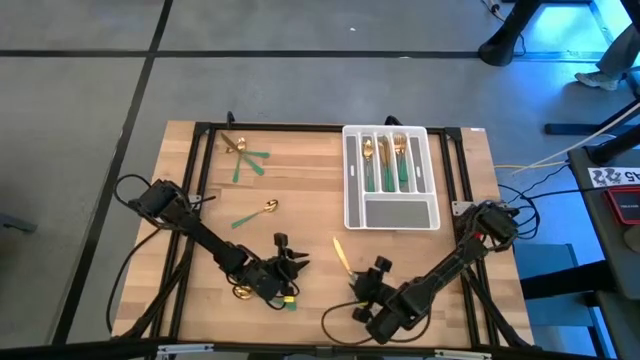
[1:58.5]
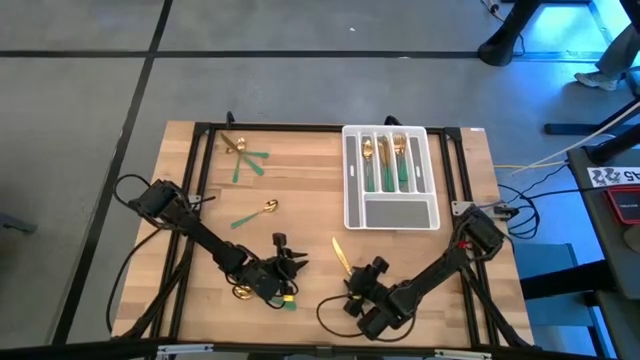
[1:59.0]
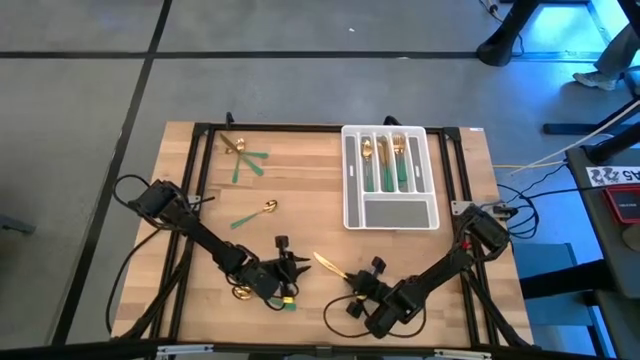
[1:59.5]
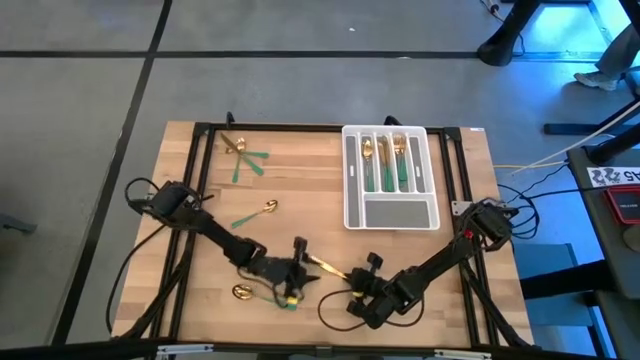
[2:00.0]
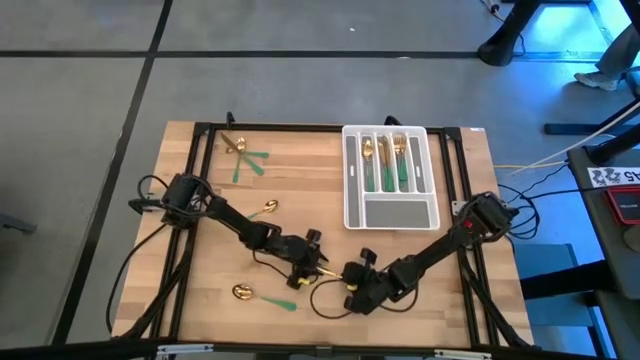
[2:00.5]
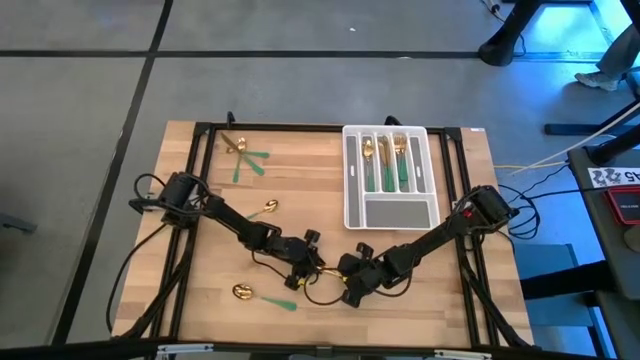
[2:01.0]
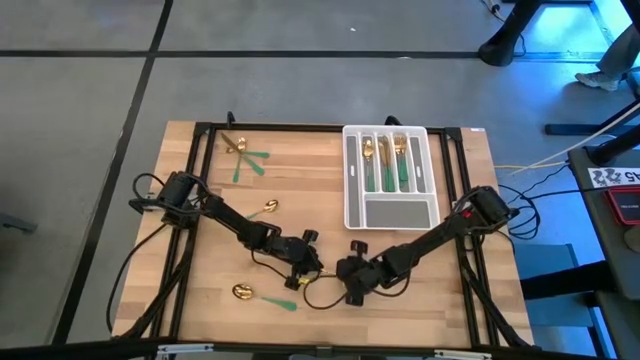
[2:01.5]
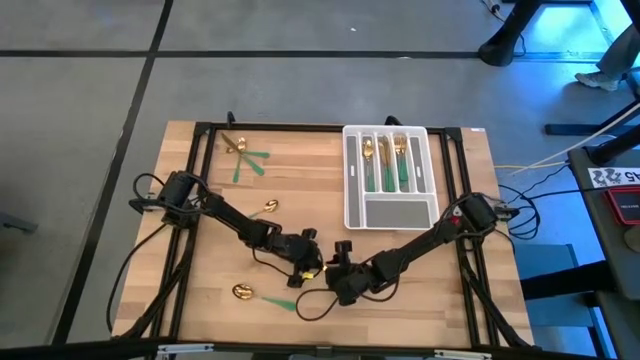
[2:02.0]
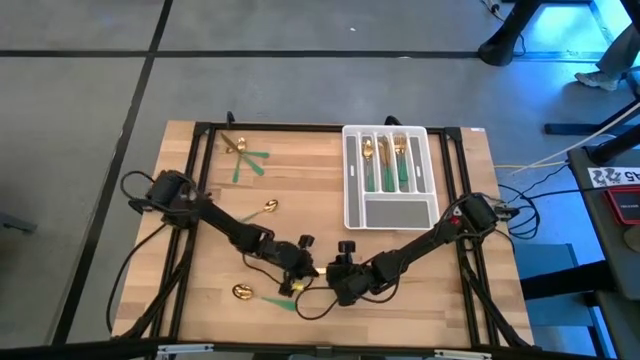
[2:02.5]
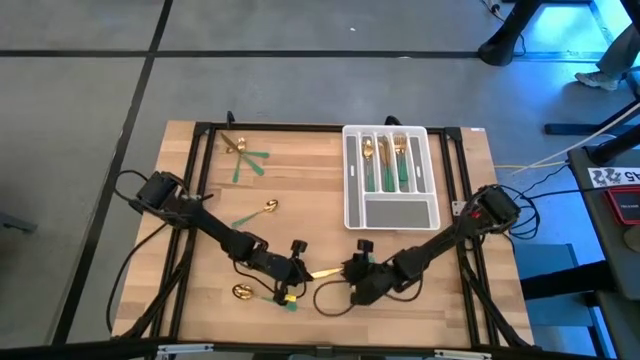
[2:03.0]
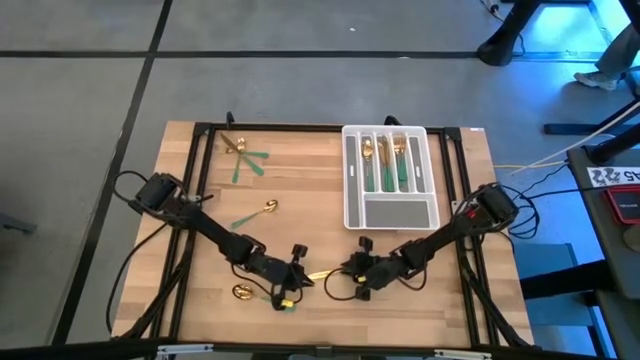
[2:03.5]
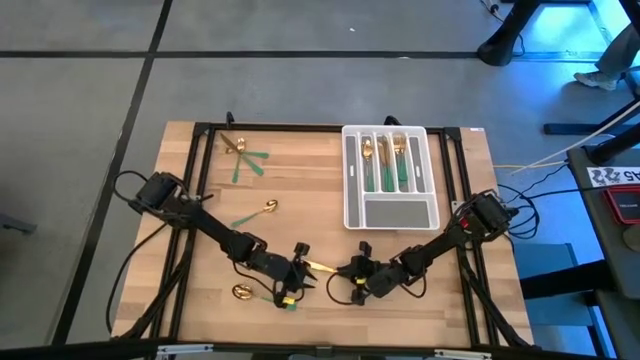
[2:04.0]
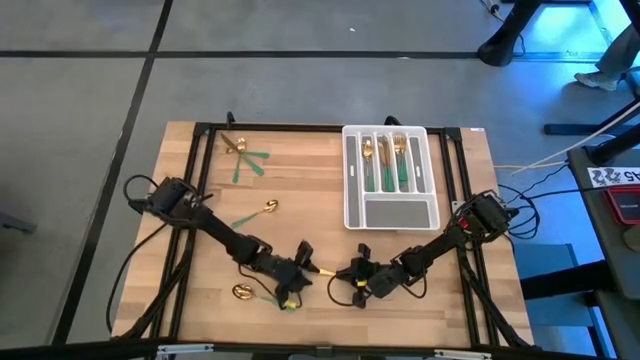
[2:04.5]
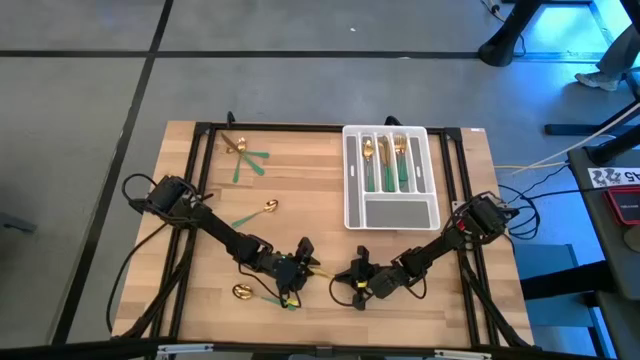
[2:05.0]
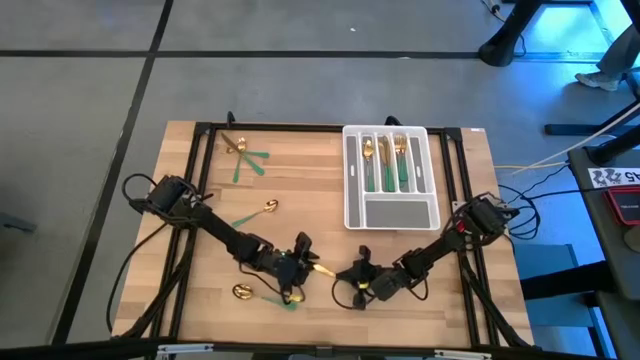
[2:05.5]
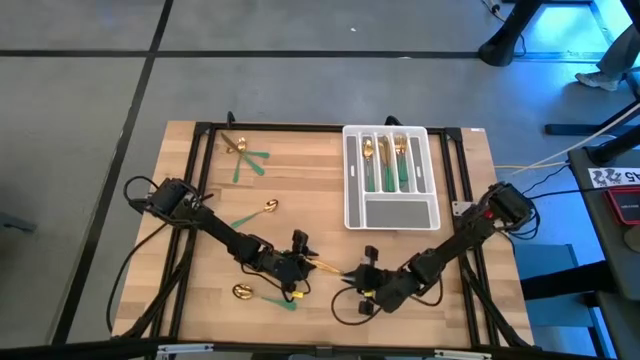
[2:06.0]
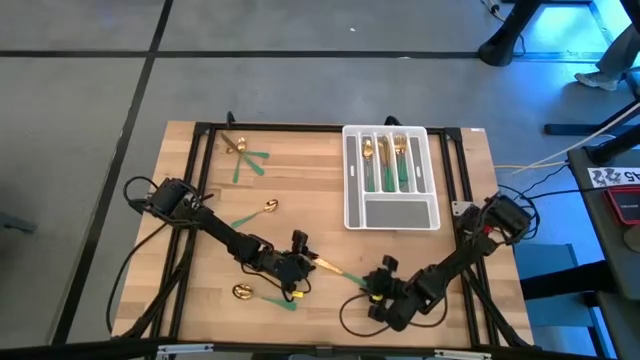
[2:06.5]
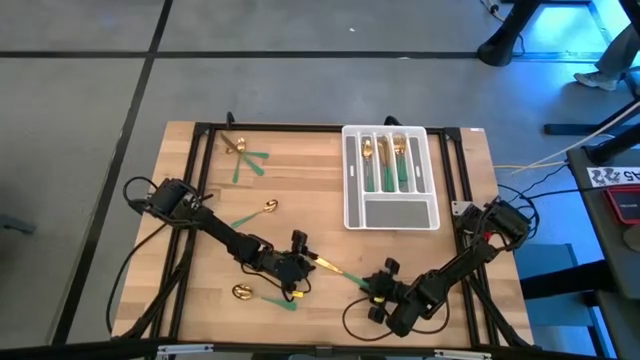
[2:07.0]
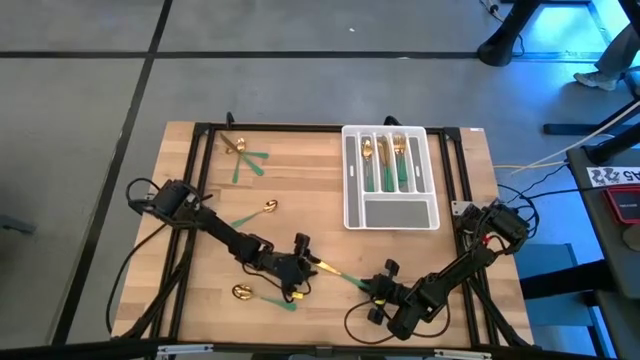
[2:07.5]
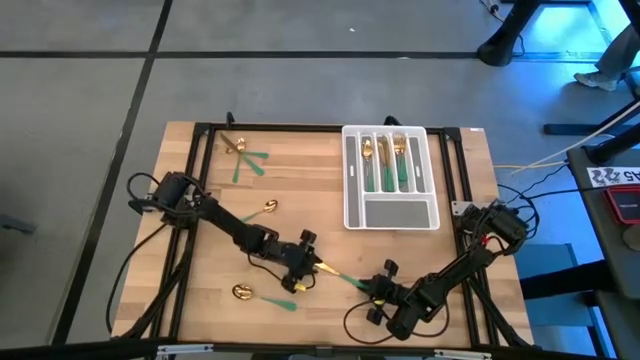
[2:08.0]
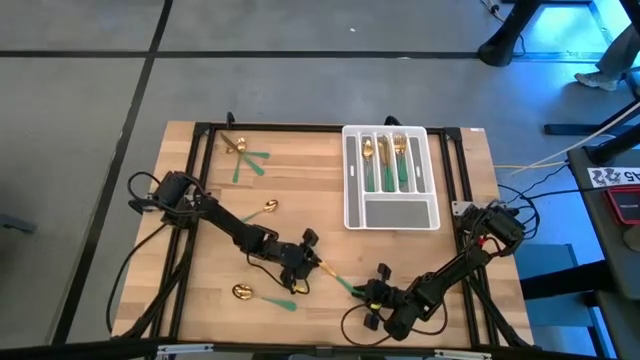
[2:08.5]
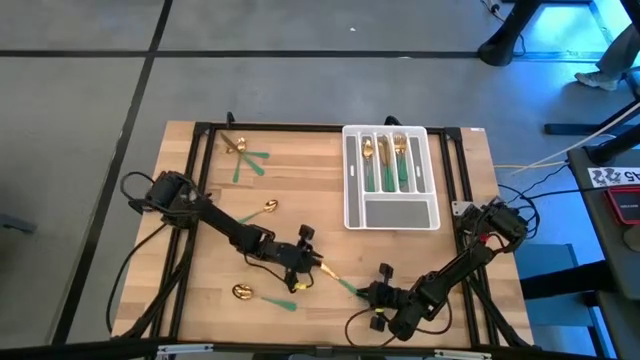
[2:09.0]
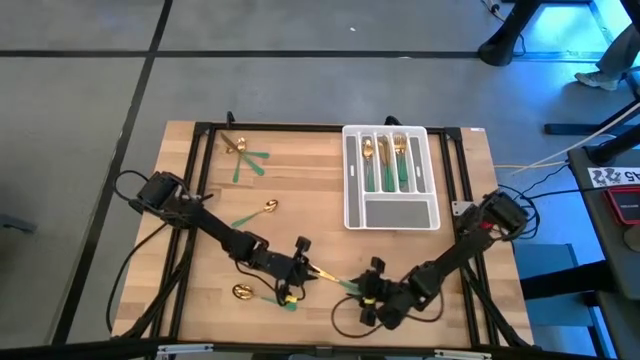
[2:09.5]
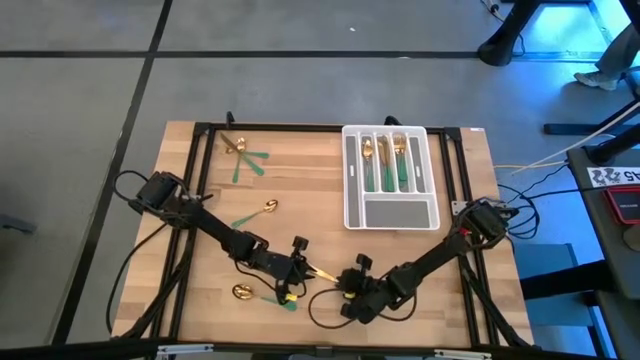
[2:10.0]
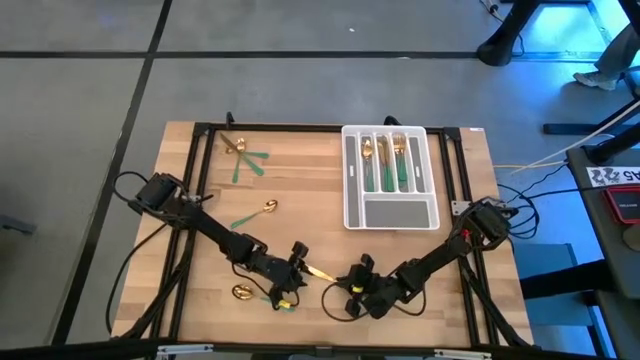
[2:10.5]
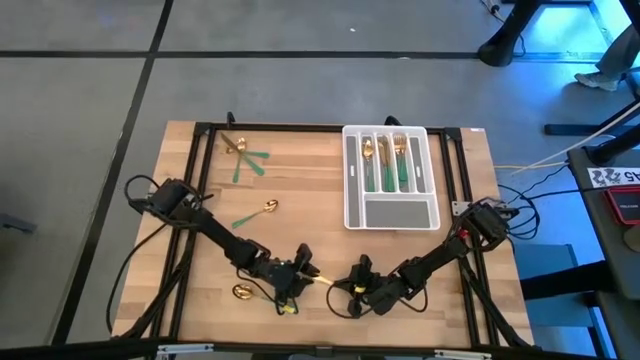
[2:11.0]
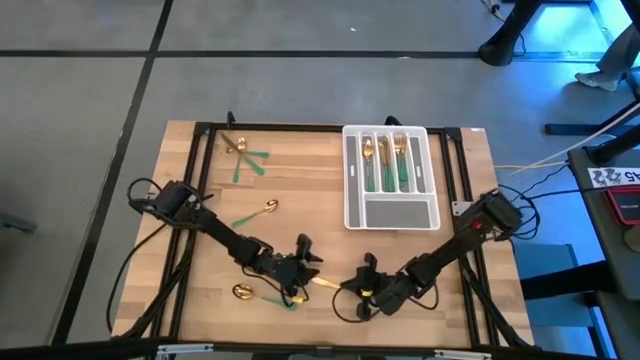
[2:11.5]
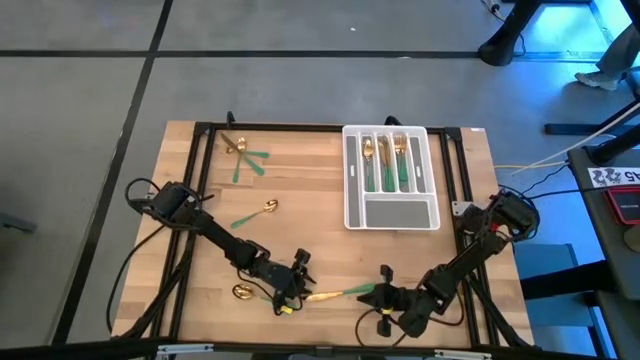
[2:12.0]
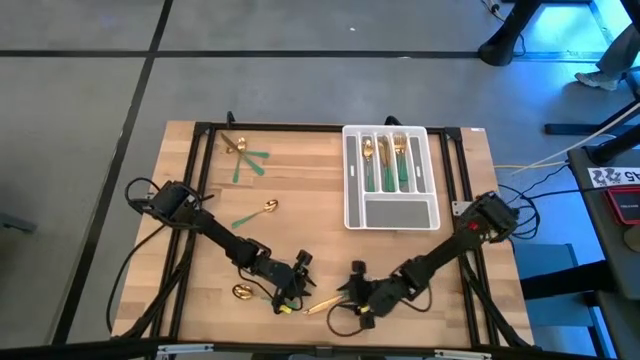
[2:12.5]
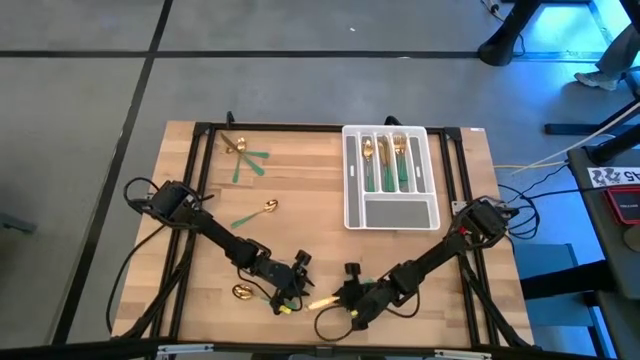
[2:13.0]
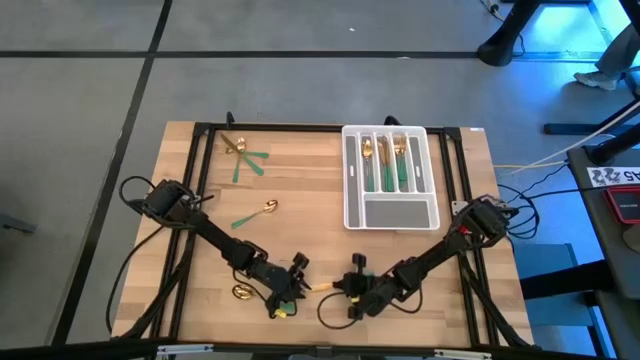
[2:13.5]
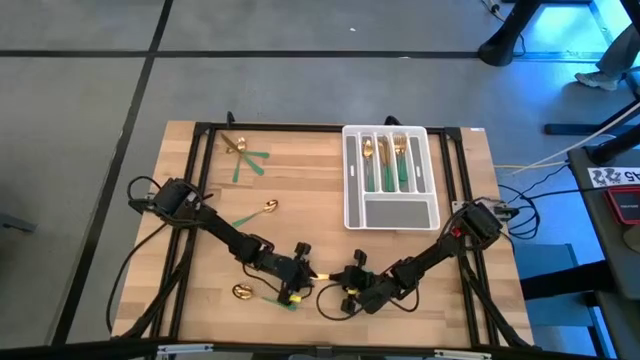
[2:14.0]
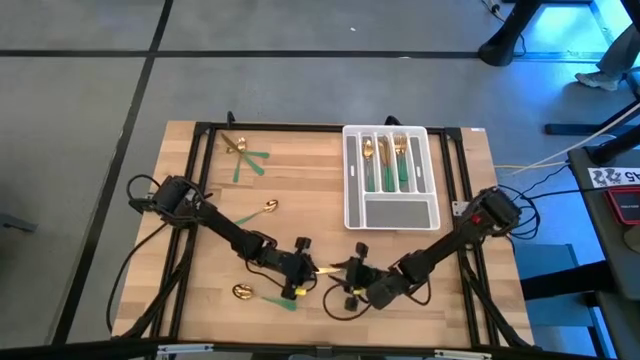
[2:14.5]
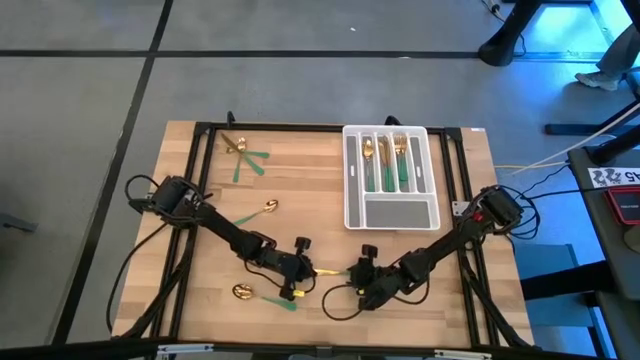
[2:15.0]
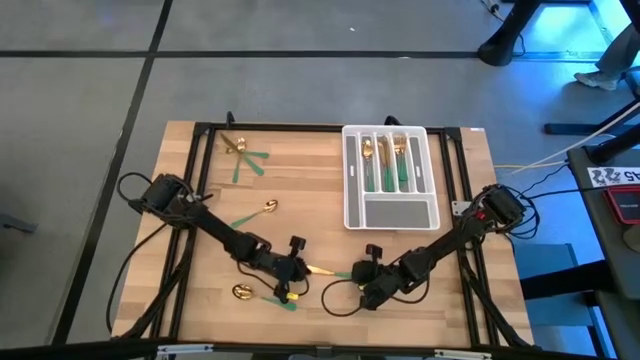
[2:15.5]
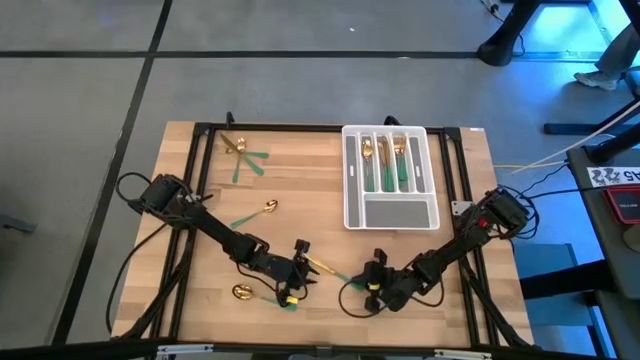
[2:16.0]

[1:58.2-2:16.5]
Task: Sort silverware
Put the green knife into the silverware tray

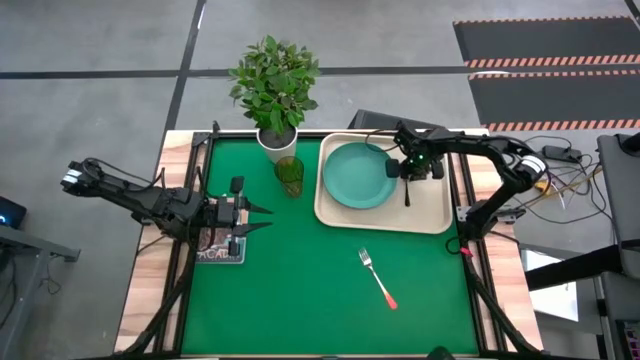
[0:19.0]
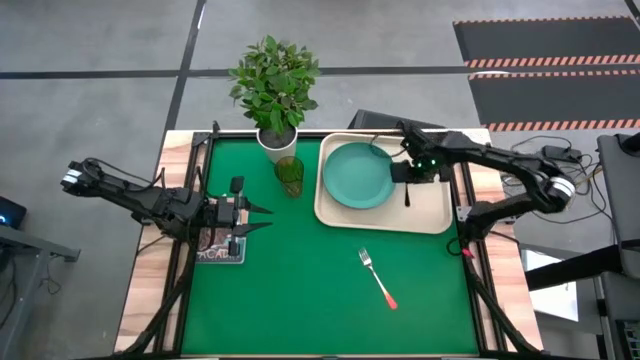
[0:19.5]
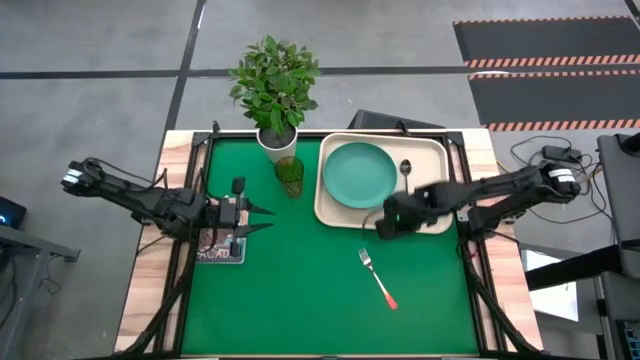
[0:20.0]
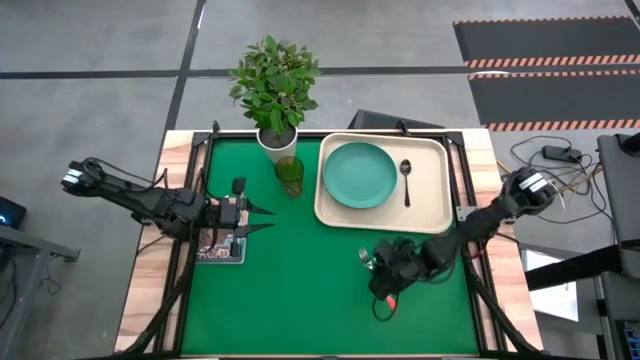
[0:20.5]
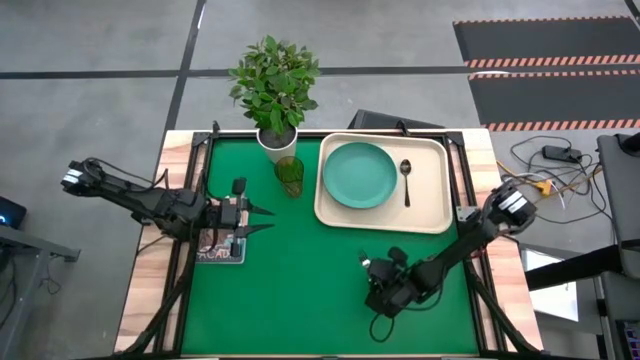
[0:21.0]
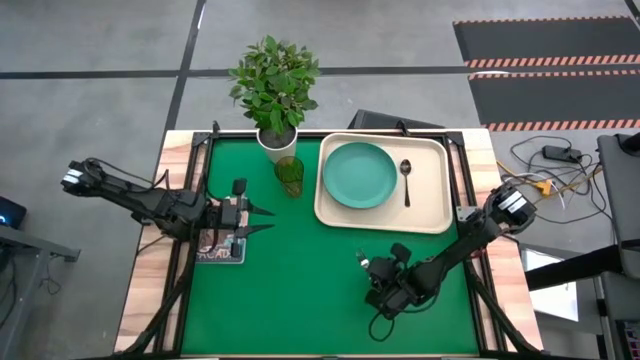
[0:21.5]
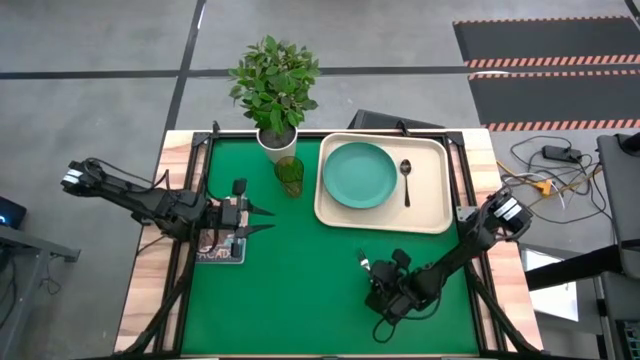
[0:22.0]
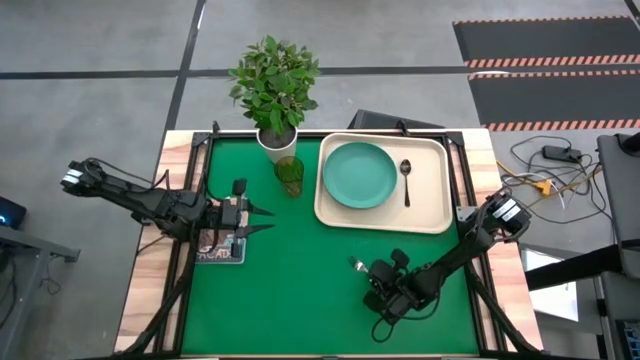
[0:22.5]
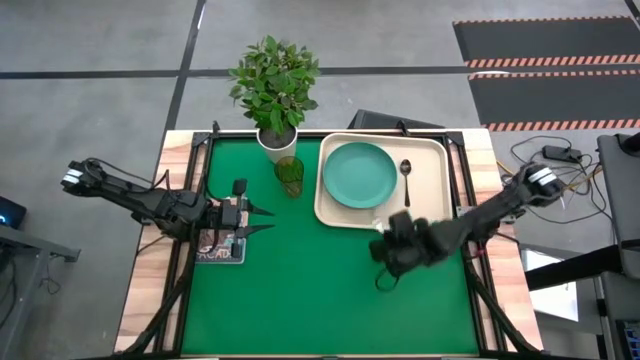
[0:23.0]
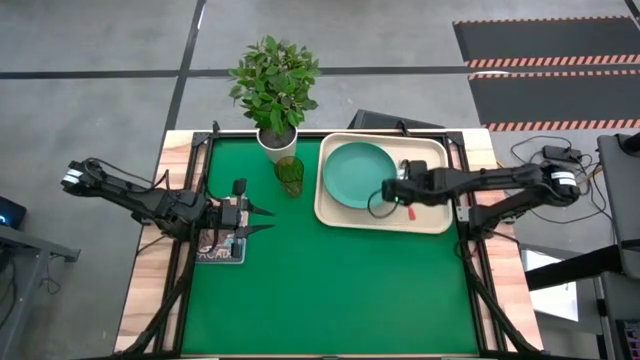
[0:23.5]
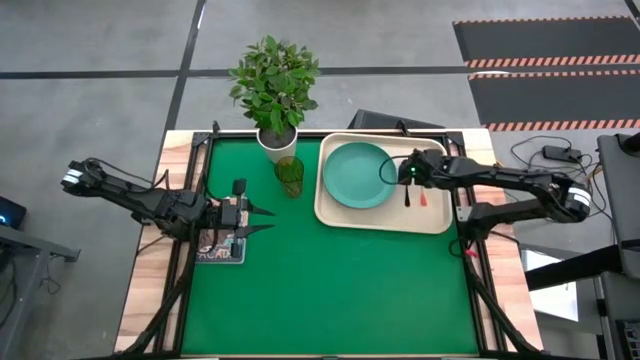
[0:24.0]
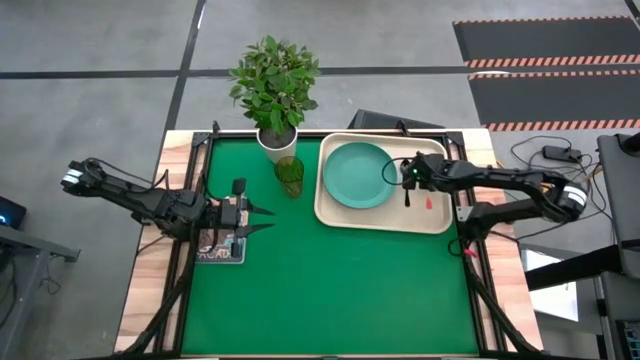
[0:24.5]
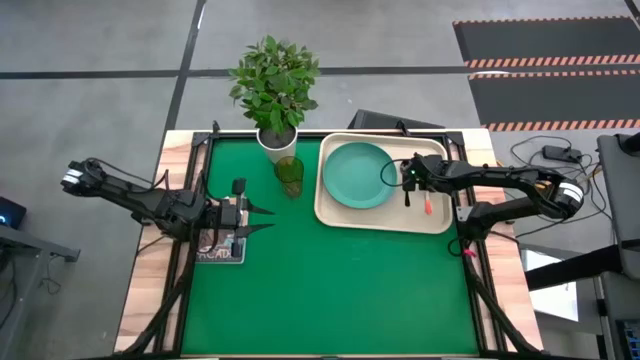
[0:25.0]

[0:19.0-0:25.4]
Task: Pick and place plate/cup/fork/spoon on tray
Put the orange fork to the right of the black spoon on the white tray
